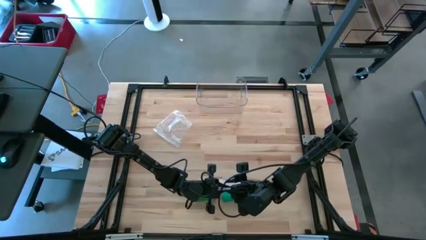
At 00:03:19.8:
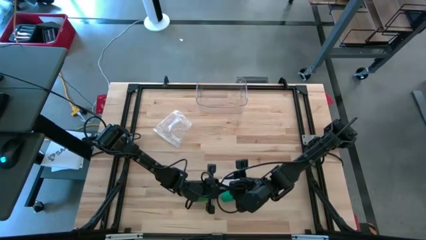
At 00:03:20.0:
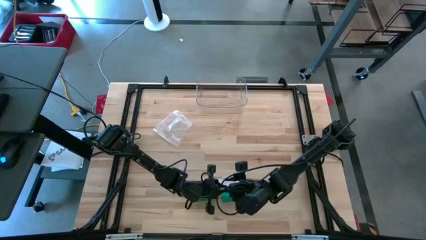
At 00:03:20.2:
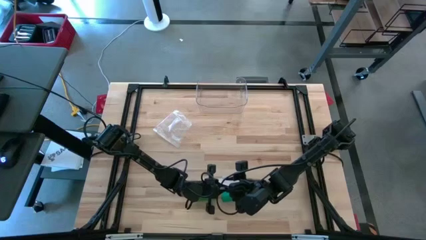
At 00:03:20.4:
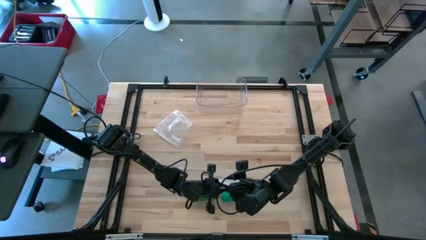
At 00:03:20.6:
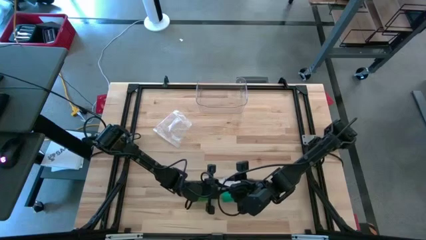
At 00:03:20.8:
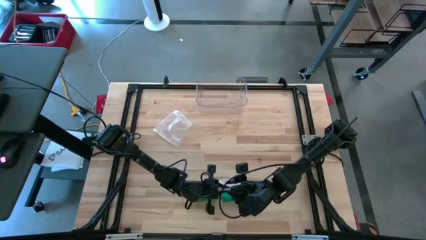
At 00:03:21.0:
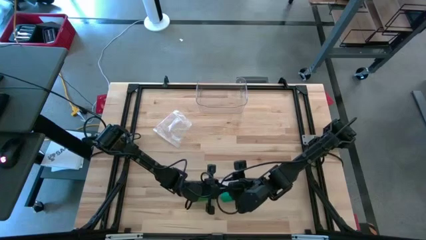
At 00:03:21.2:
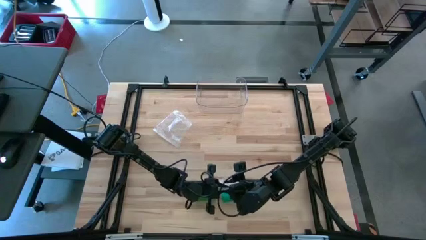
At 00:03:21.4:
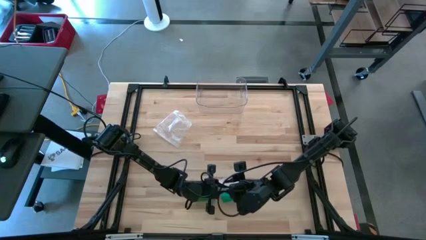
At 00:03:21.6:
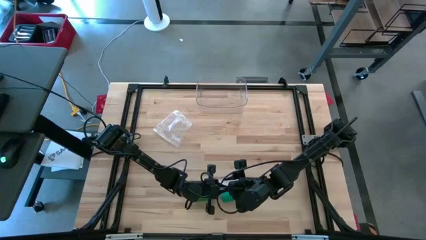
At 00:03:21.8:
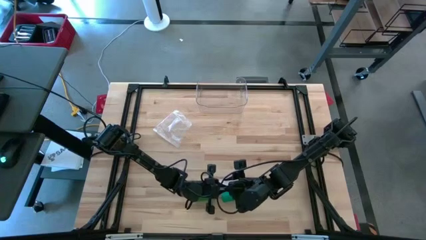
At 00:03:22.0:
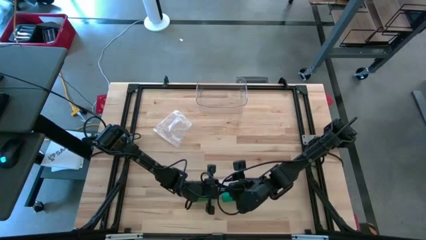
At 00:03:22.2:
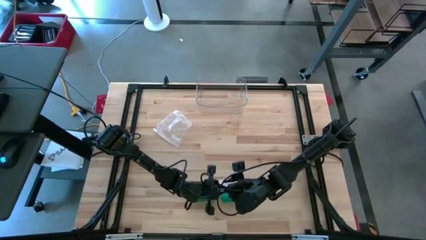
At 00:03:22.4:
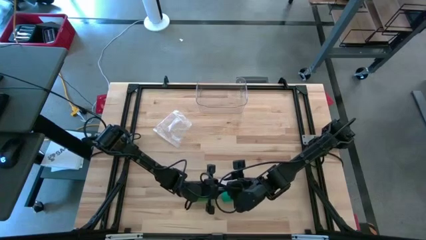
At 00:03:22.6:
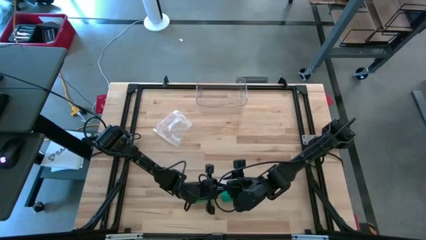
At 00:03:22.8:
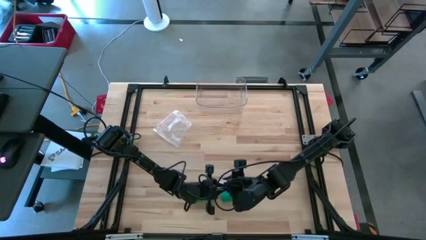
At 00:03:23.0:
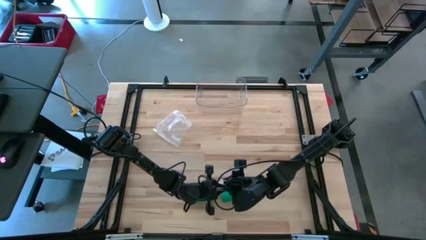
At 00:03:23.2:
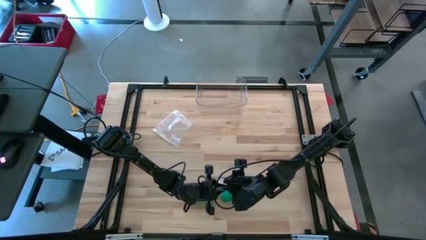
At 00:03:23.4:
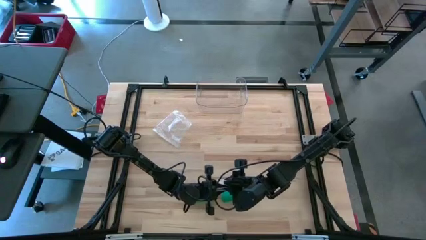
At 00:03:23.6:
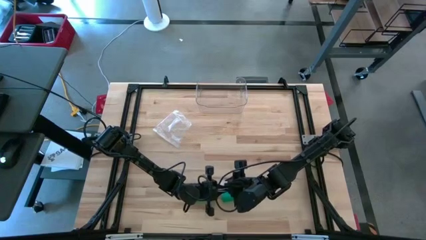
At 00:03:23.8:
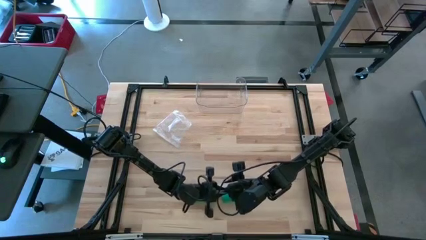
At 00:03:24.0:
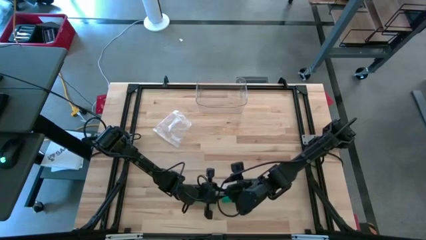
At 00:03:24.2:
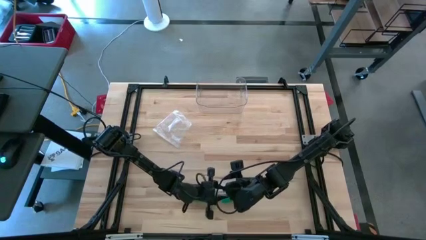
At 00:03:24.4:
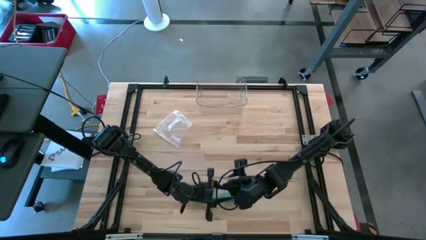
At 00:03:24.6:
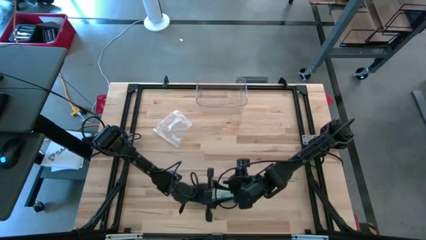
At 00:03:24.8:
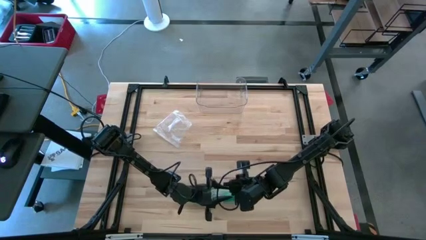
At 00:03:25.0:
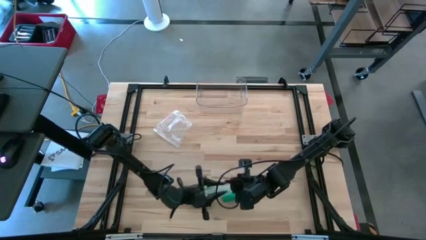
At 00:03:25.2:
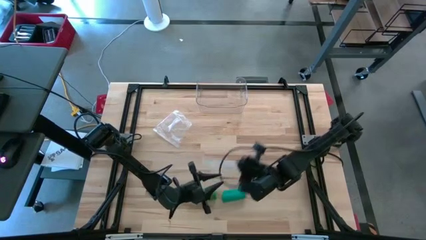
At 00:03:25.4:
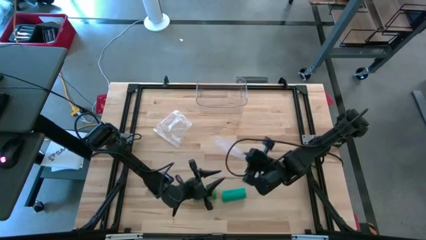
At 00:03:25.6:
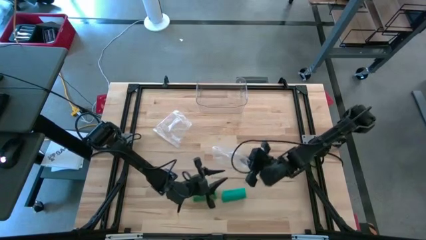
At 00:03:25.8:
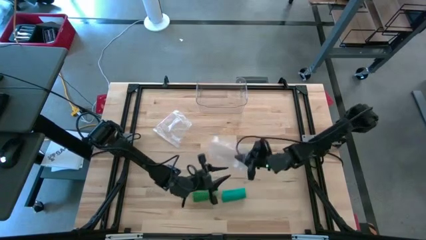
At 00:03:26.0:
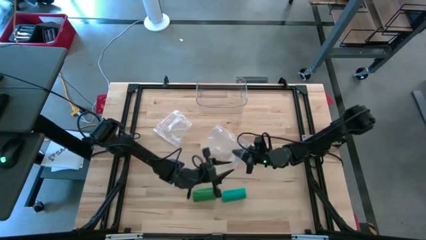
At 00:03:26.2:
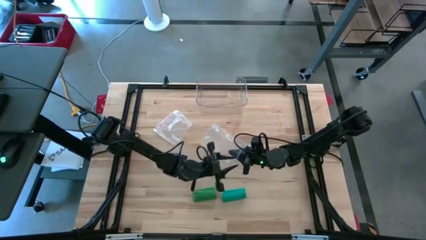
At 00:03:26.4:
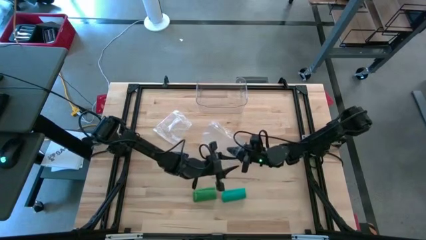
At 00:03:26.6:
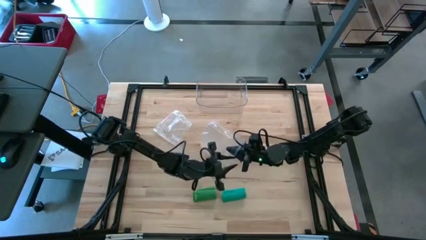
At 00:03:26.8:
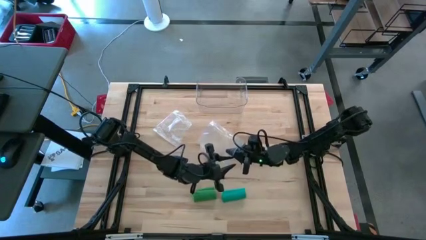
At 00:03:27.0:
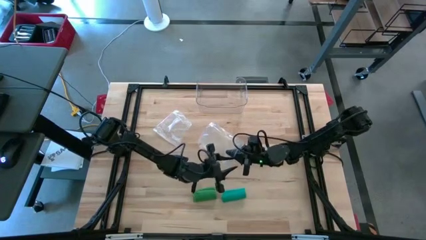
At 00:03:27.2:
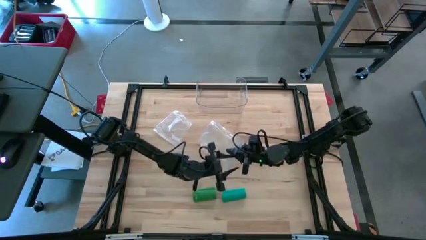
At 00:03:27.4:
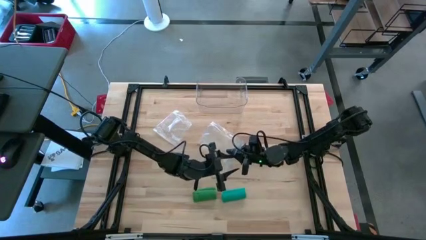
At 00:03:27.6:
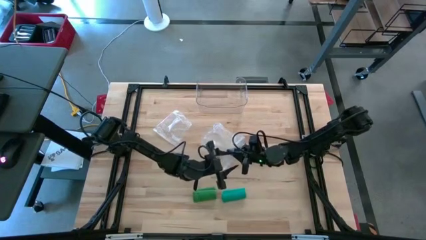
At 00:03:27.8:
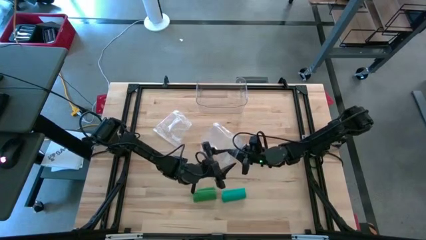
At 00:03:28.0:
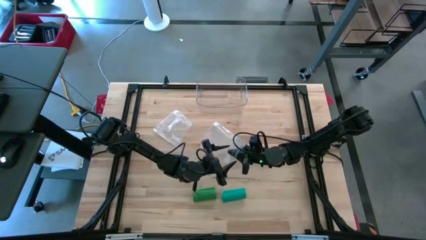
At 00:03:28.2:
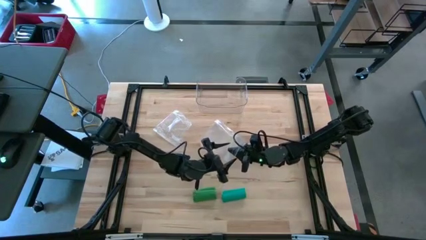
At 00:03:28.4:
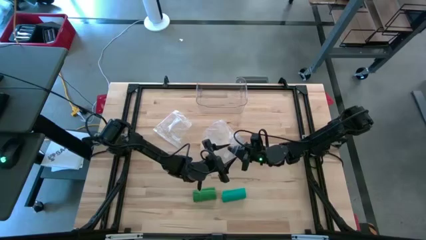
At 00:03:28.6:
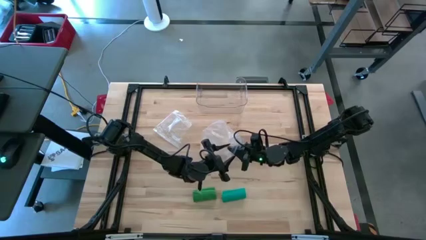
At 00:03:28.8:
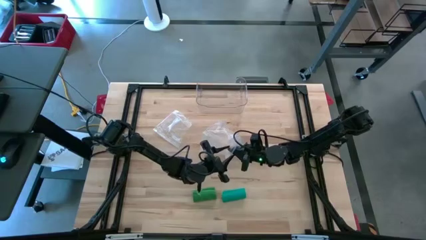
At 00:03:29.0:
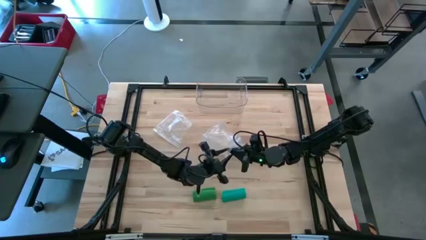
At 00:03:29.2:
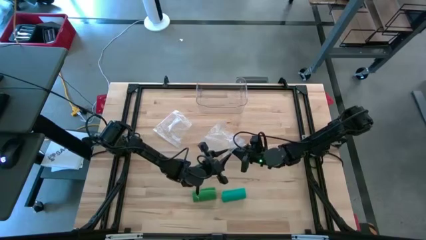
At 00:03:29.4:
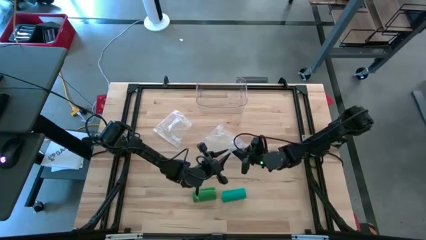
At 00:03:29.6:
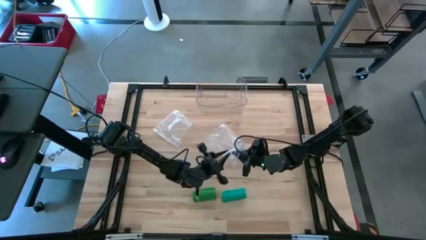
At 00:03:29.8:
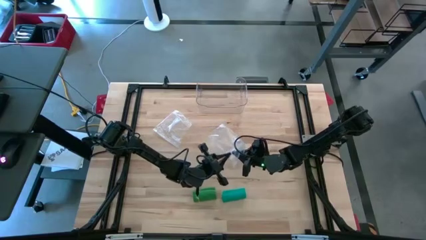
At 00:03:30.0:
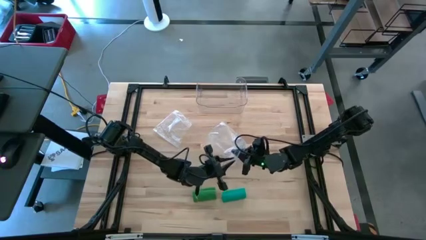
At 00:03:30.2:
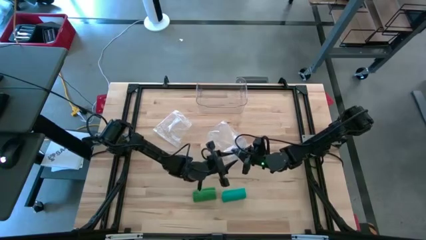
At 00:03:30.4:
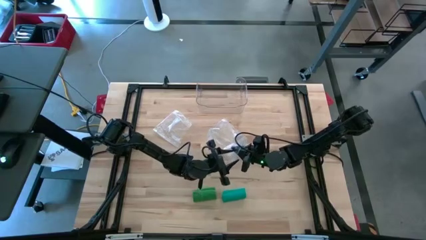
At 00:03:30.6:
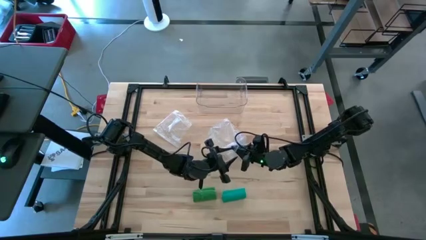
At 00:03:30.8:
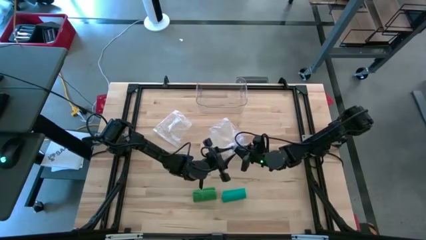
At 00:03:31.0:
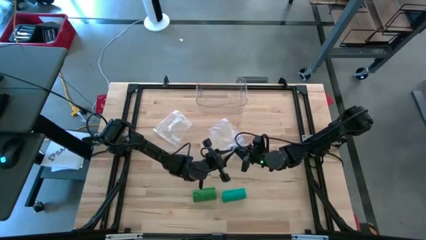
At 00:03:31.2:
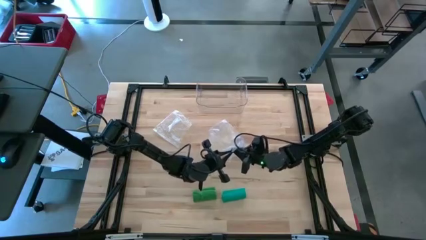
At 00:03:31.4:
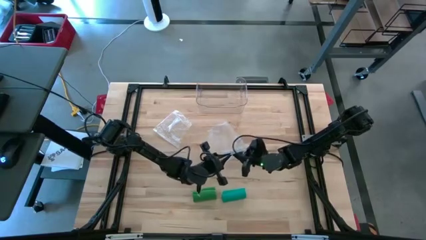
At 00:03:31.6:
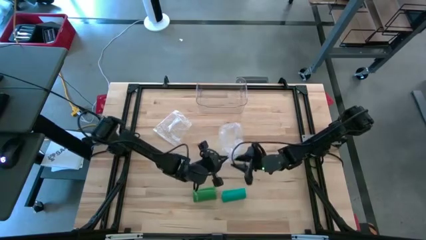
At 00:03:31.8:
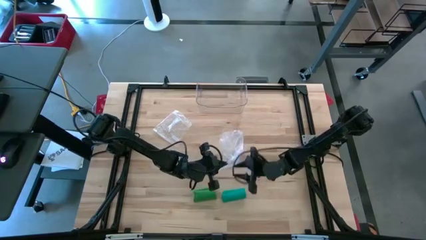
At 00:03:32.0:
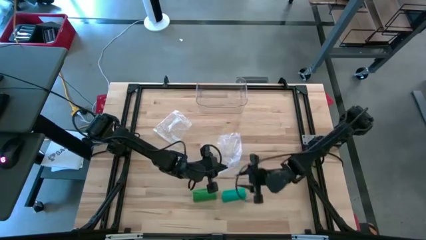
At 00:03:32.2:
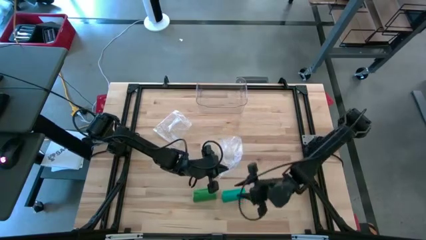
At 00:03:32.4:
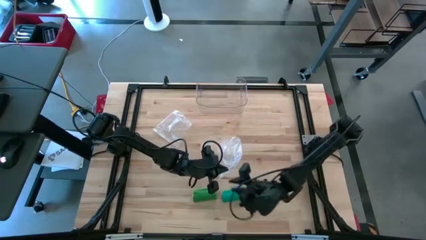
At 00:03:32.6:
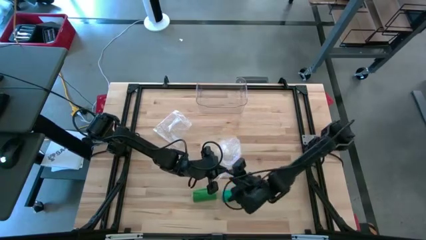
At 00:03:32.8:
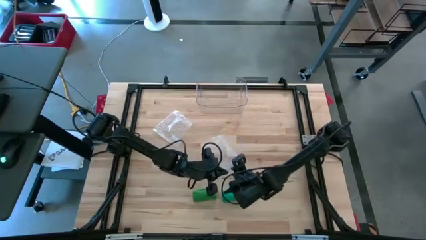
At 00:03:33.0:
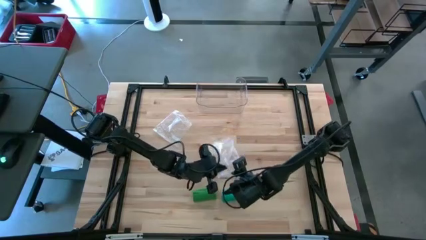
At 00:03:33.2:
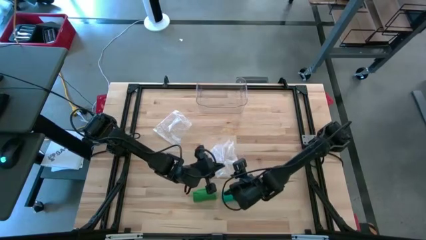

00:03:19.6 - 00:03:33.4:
Task: Roll bandage
Open the right transparent zip bag
